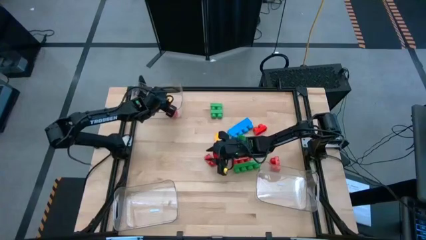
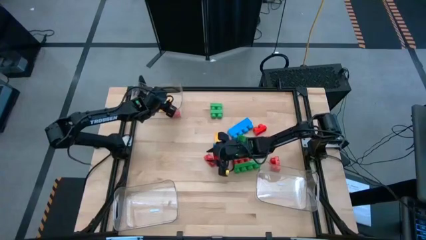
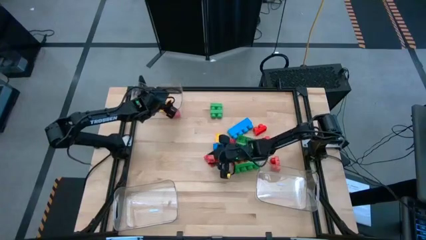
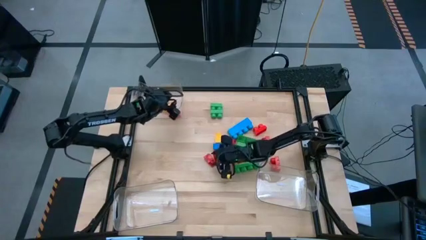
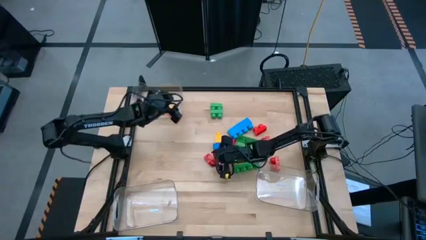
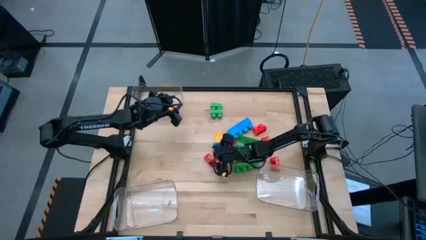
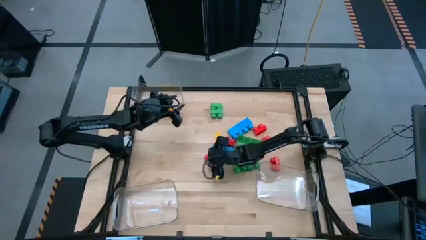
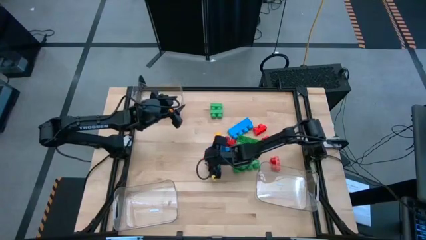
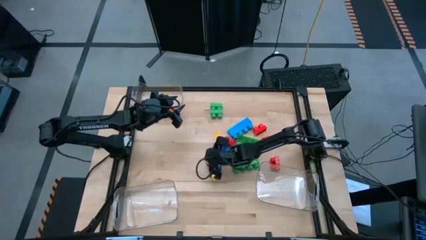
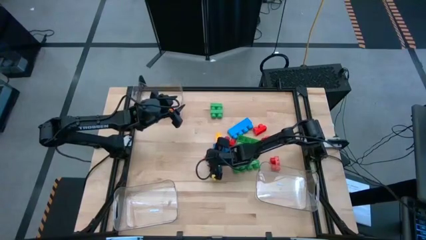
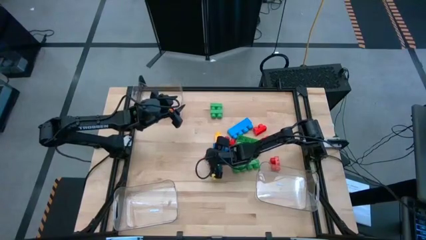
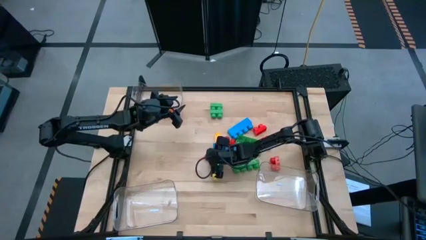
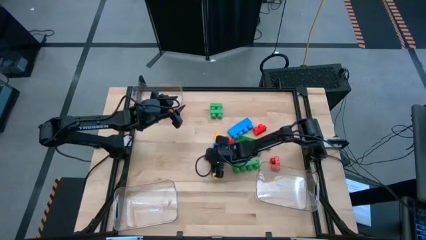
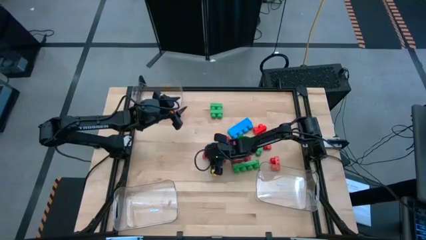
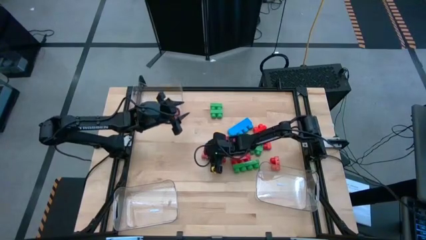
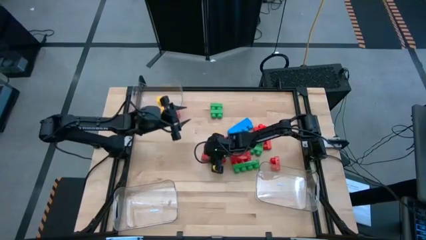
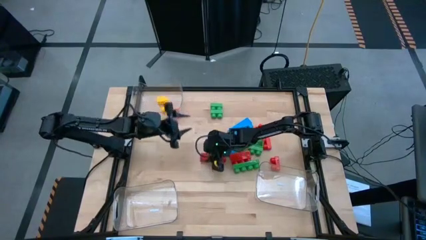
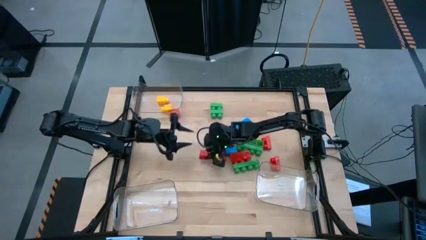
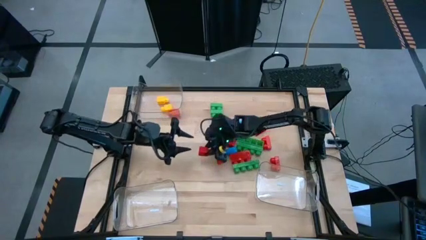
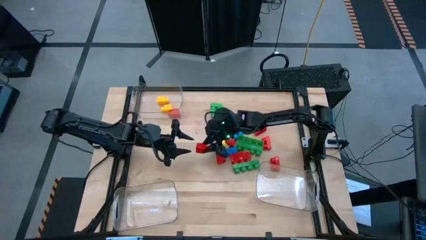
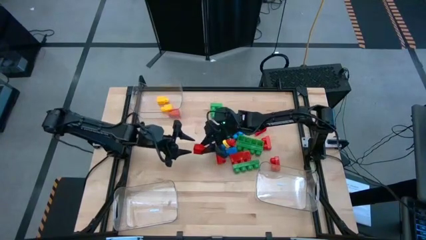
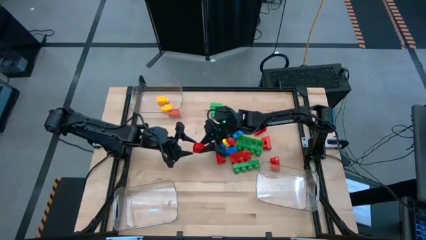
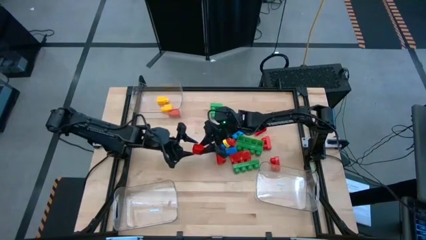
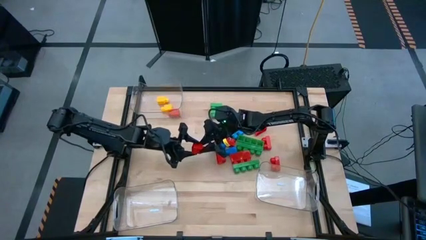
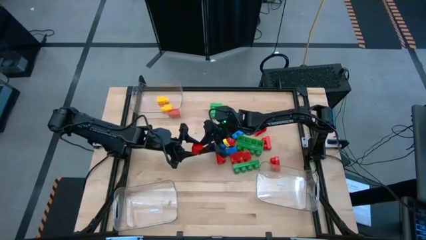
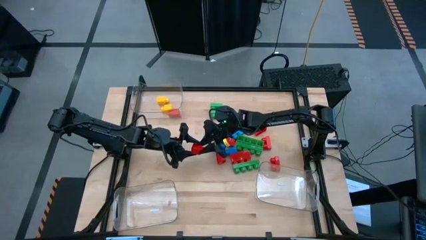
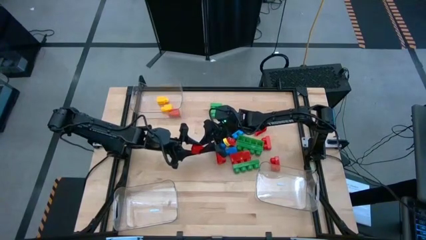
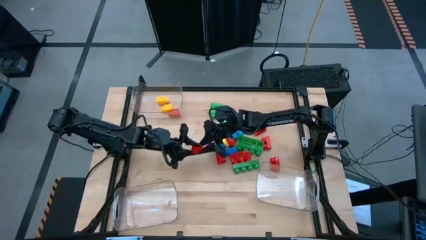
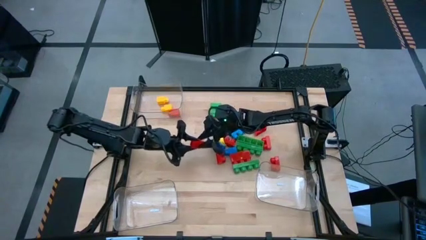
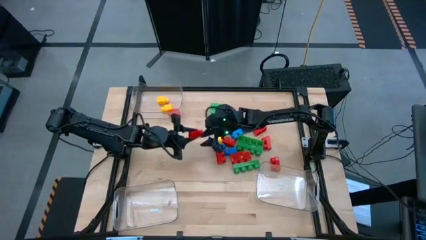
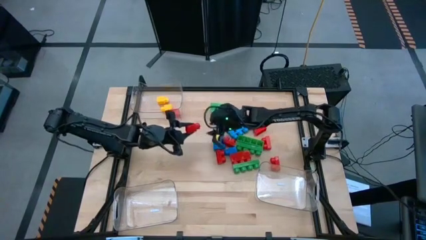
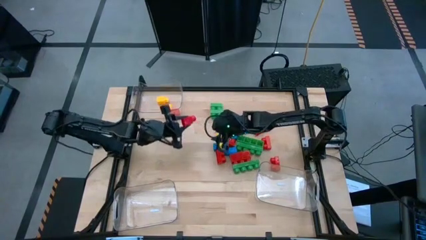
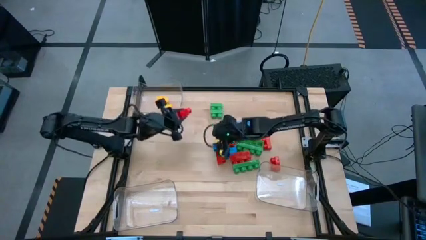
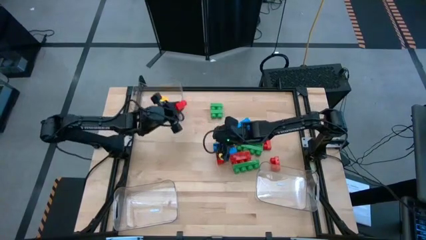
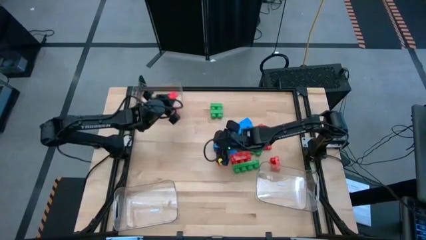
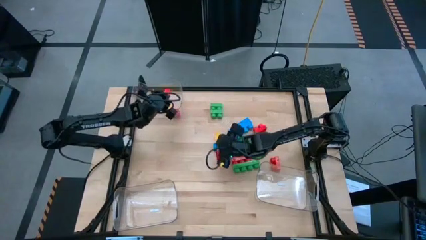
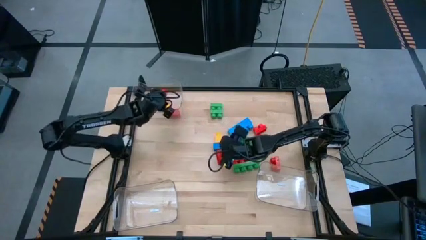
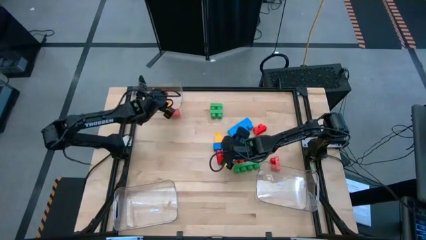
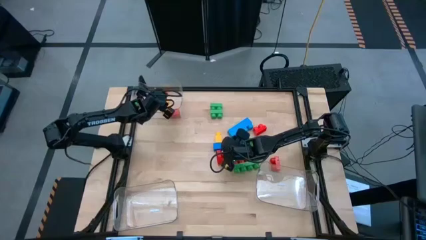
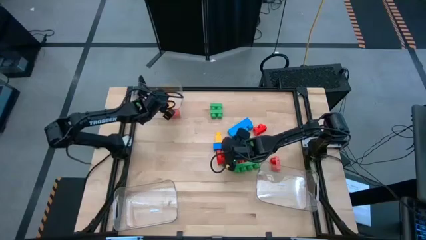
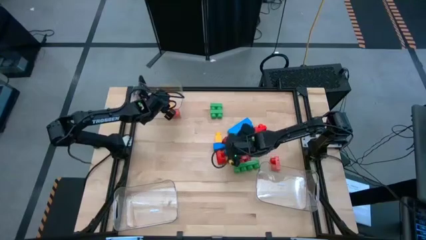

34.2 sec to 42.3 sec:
Task: Sort blocks by size
Put the one-stud red game piece into the top transparent bin

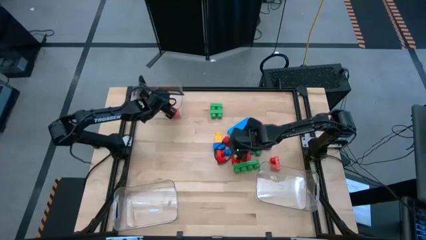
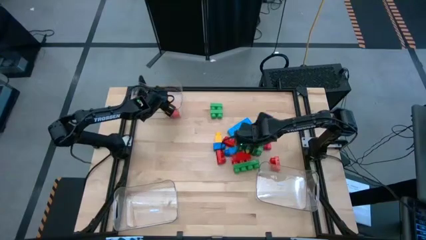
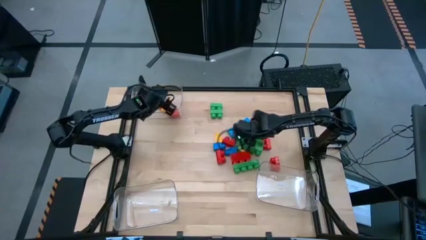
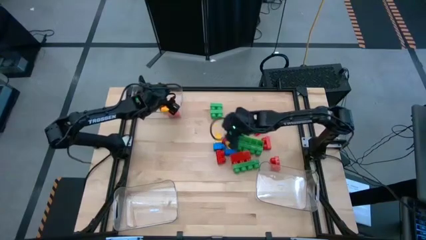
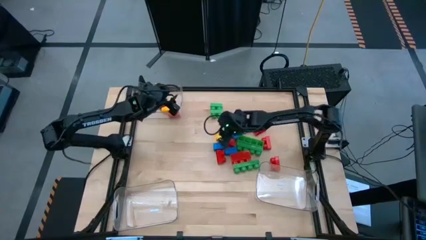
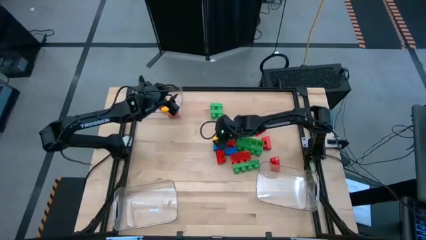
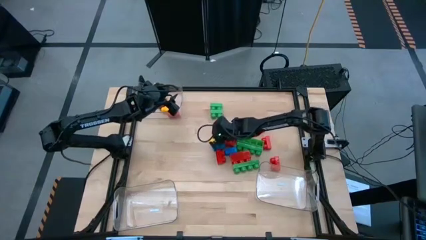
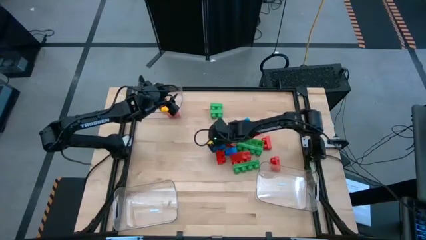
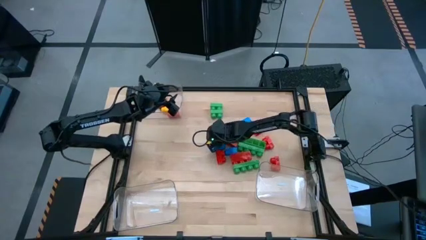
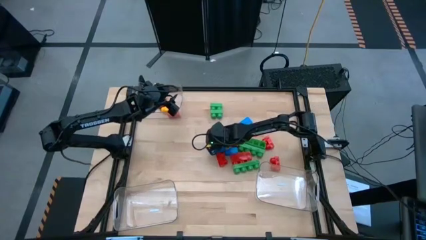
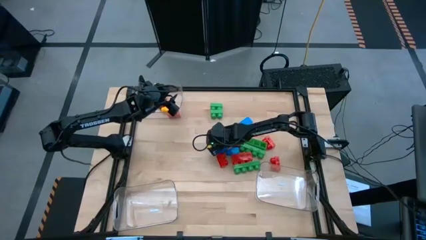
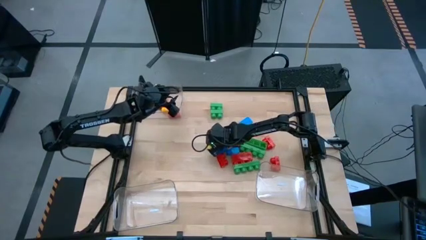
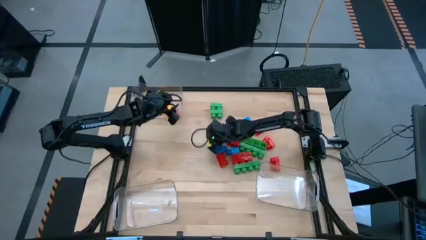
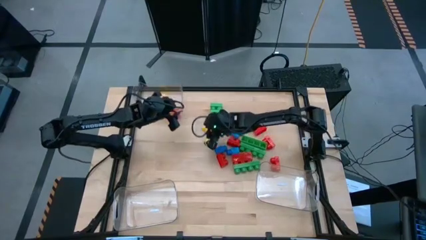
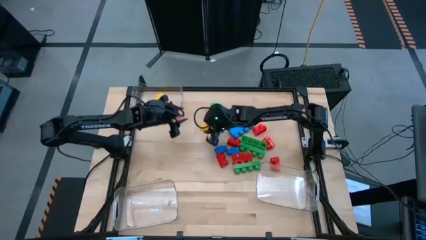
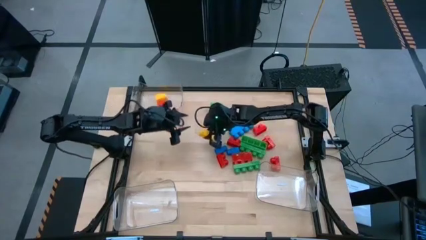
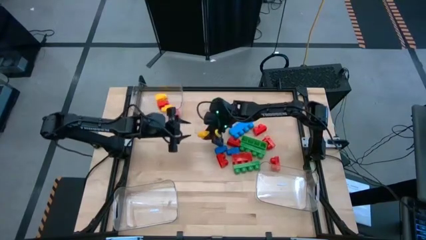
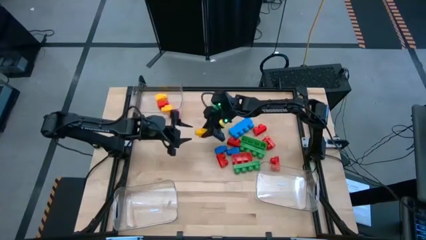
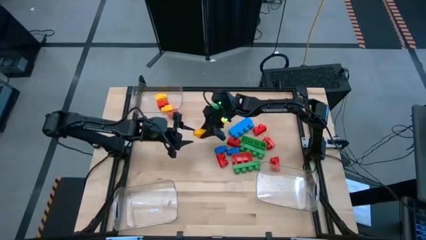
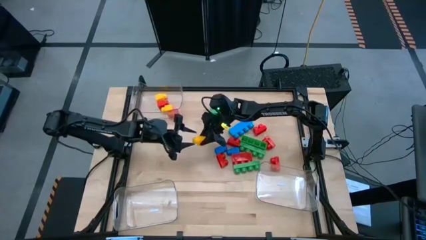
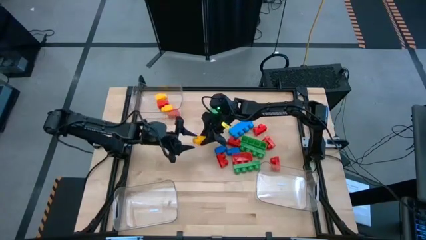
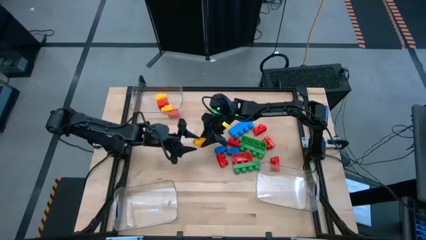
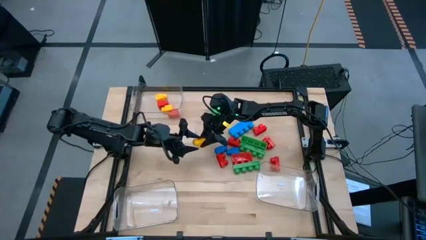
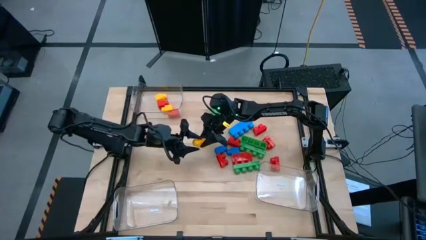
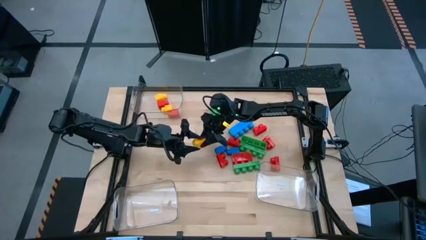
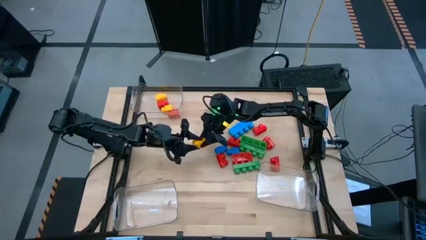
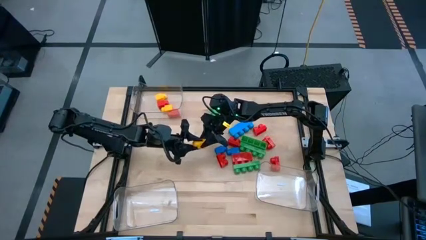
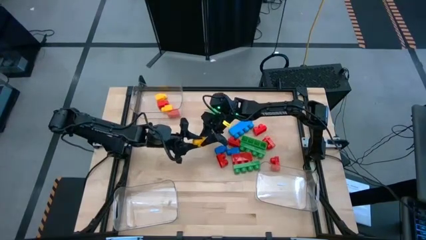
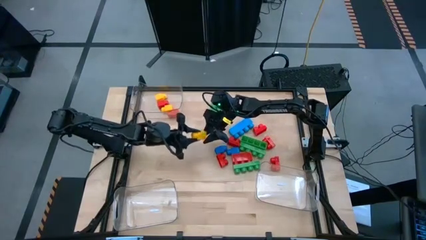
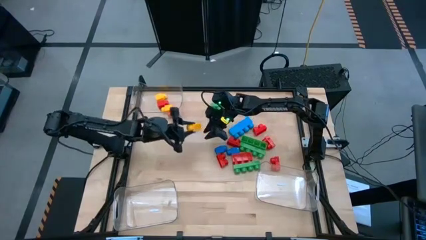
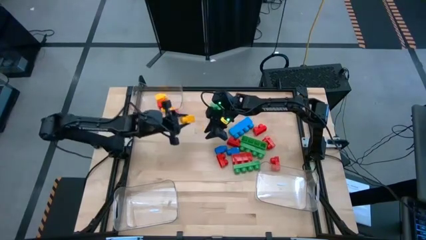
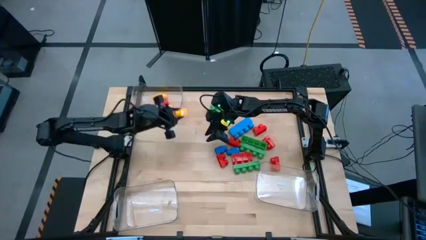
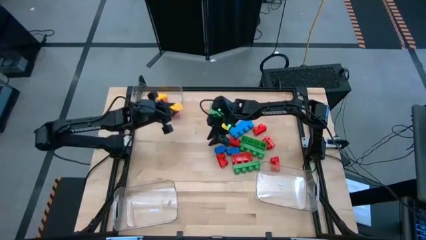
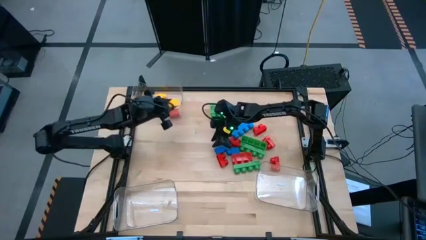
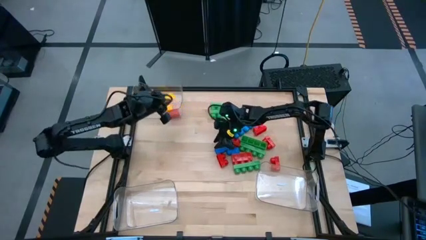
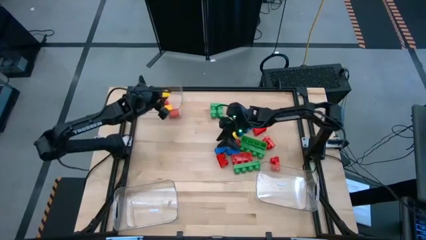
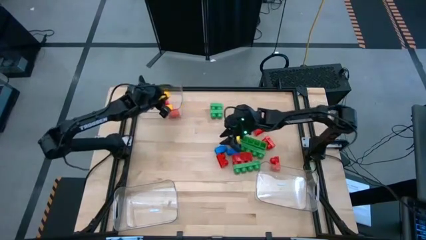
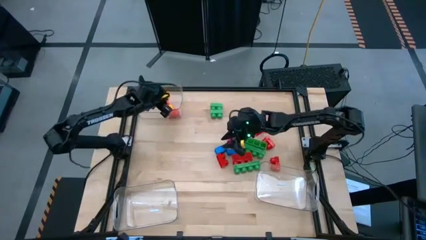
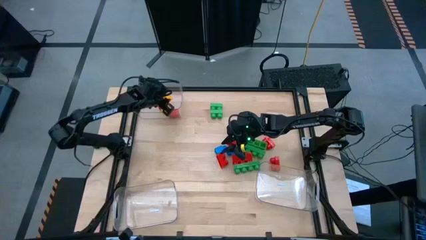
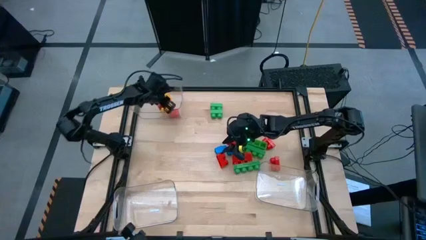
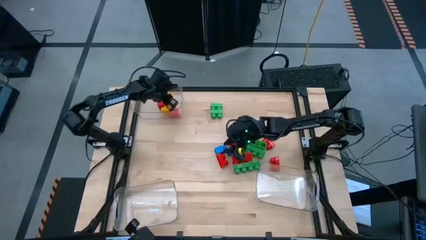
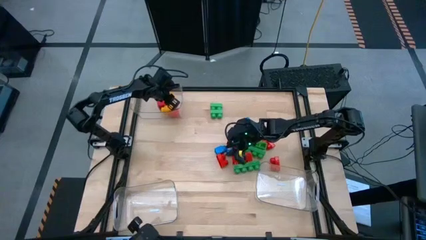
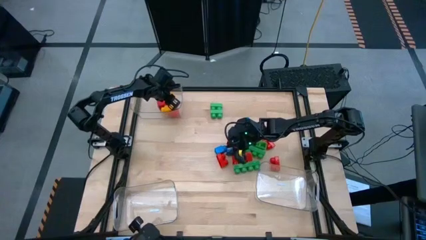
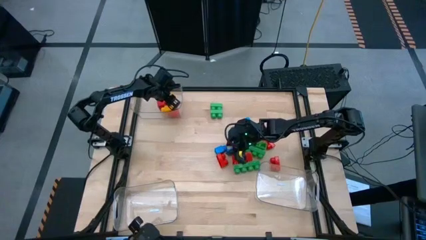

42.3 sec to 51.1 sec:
Put the one-stud yellow game piece into the top transparent bin
